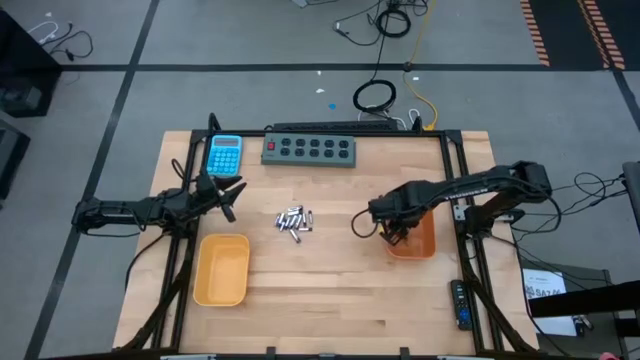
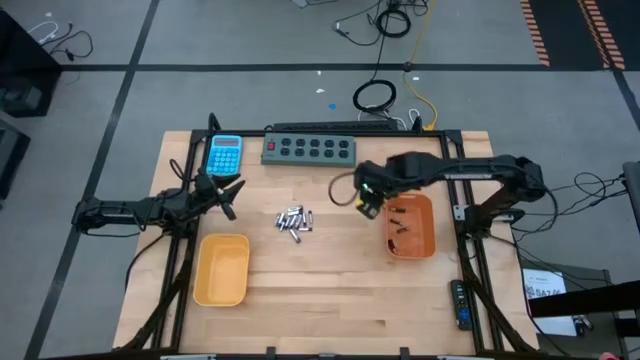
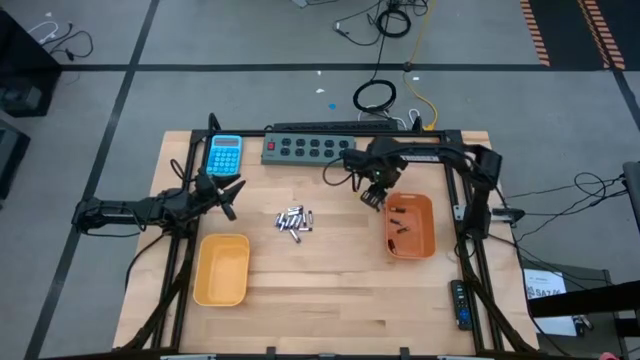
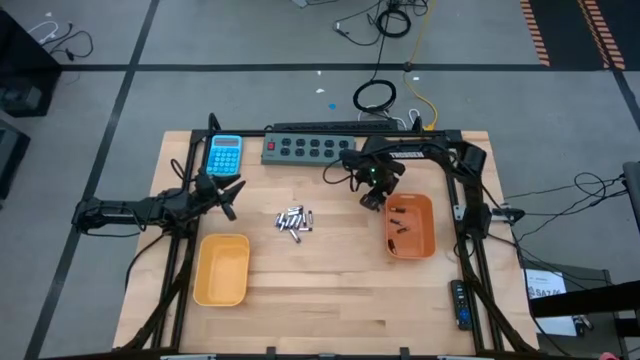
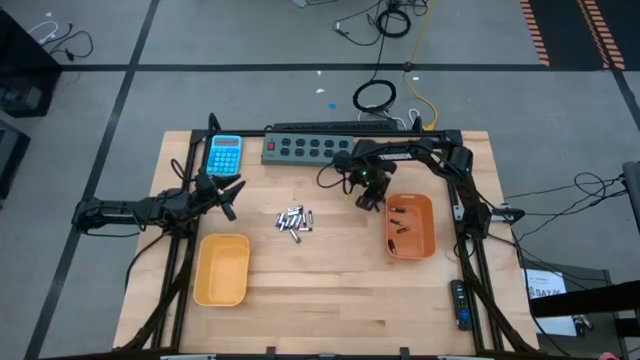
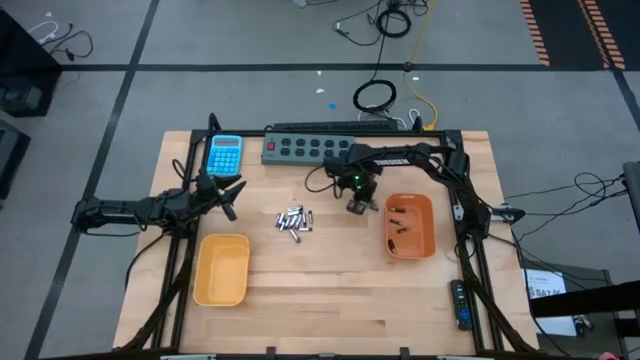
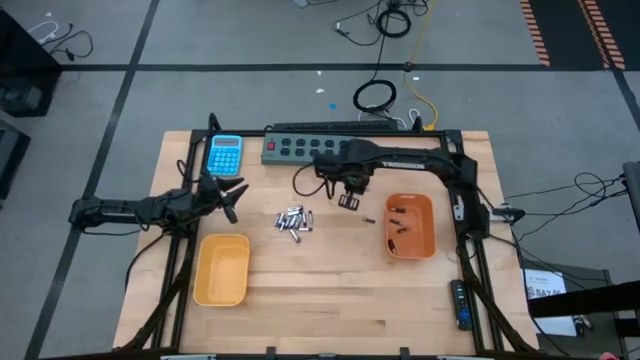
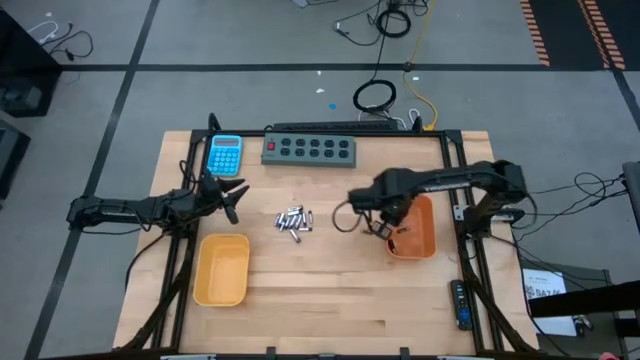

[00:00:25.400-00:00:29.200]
Task: Sort batteries
Put the black battery into the orange bin

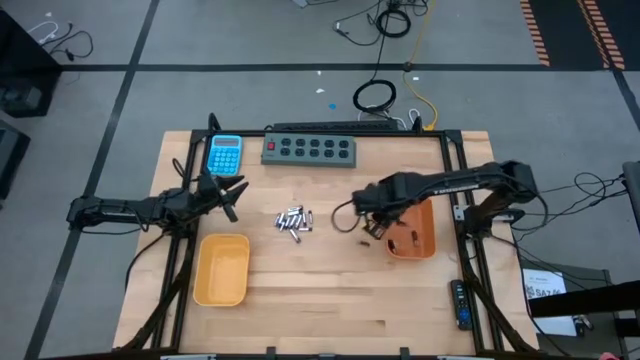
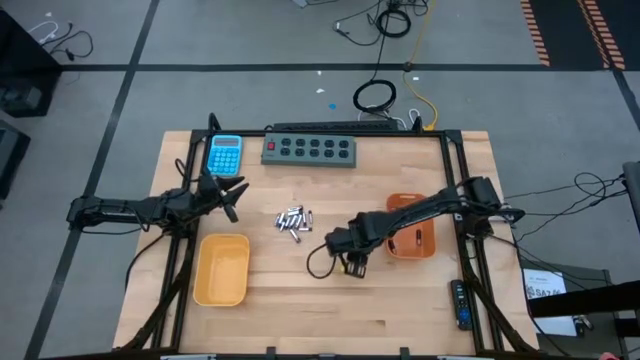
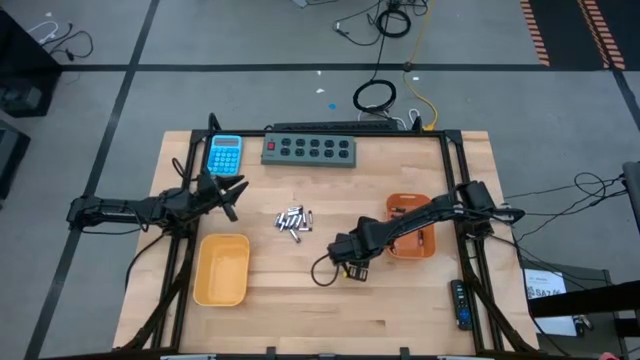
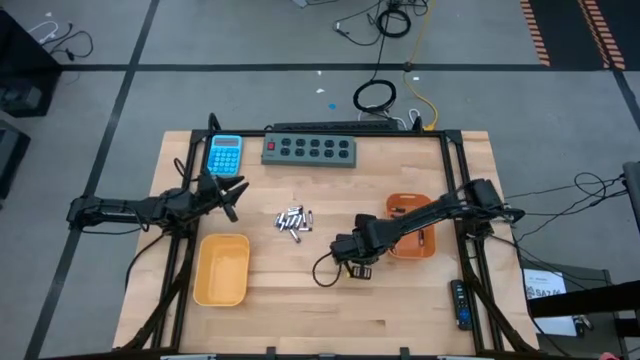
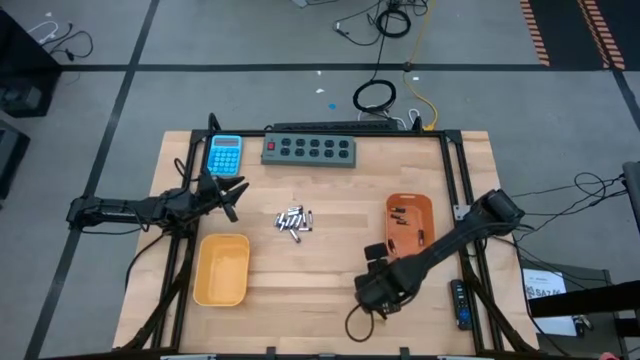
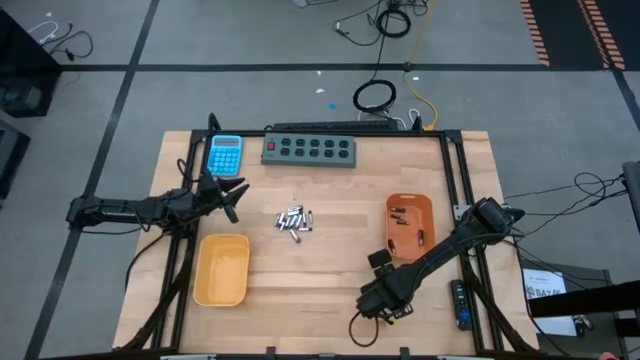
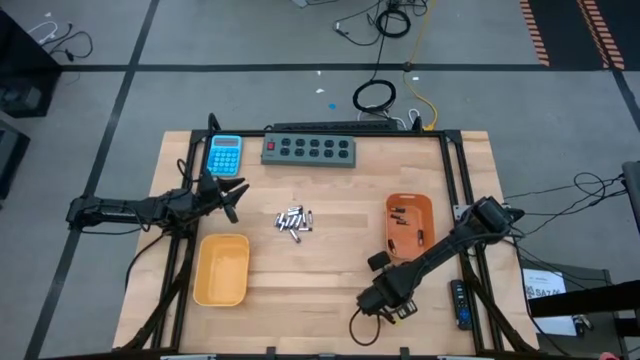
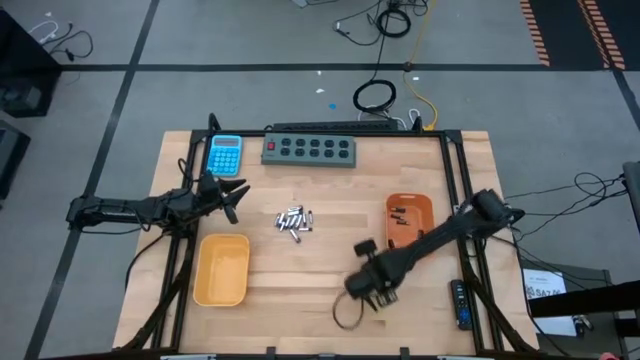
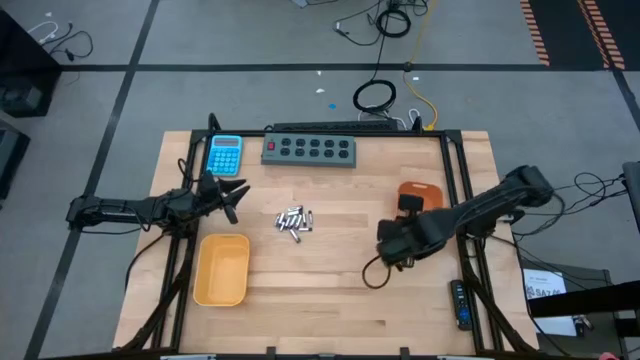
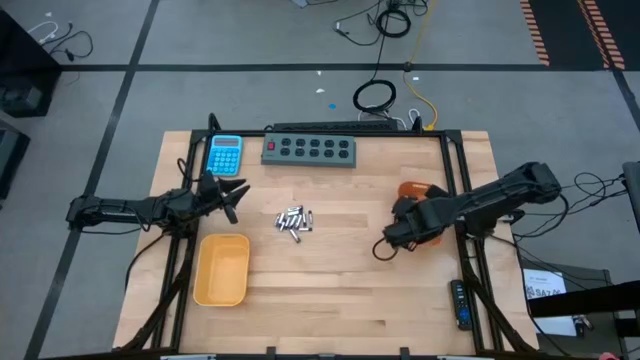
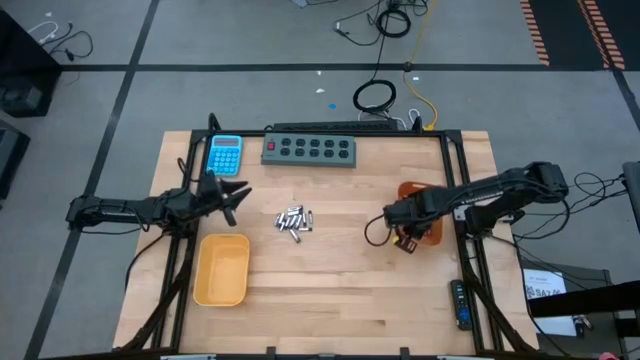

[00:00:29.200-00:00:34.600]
Put the black battery into the orange bin

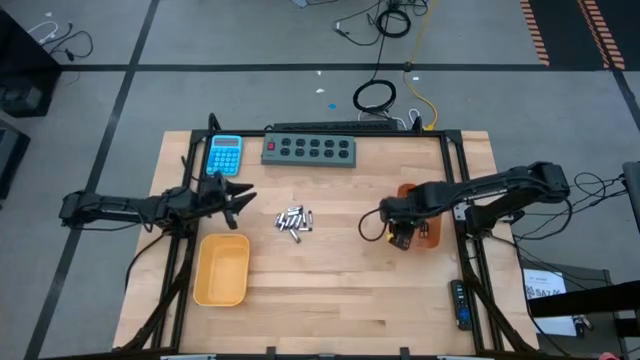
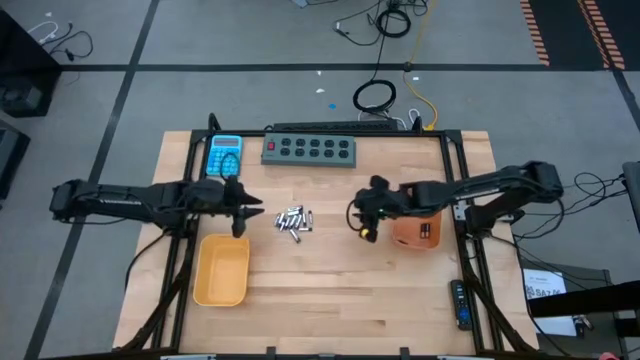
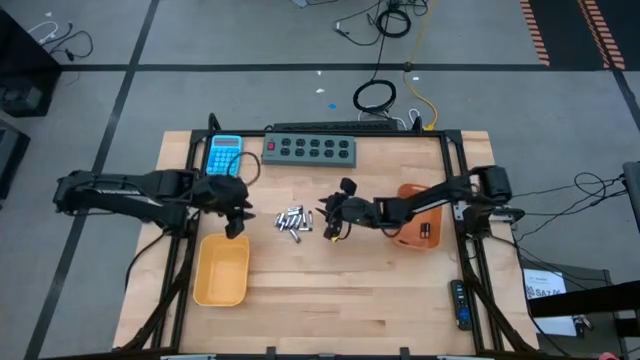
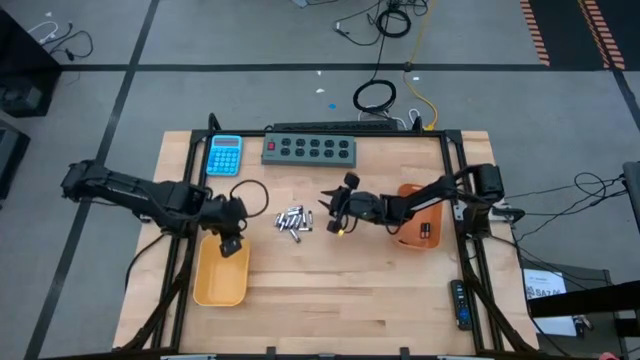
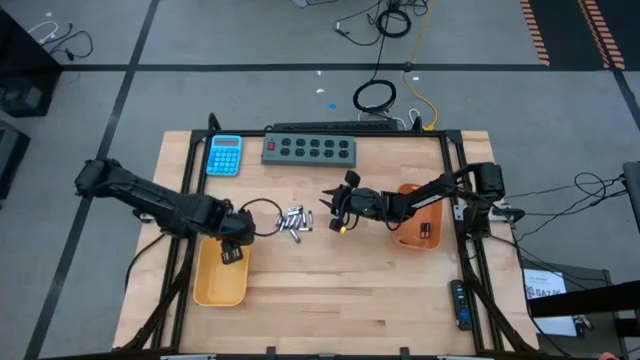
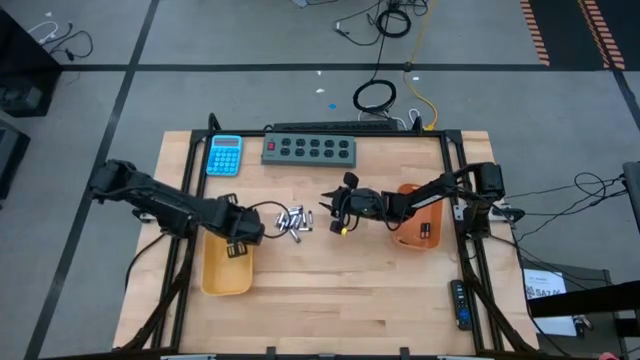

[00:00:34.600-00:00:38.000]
Adjust the yellow bin

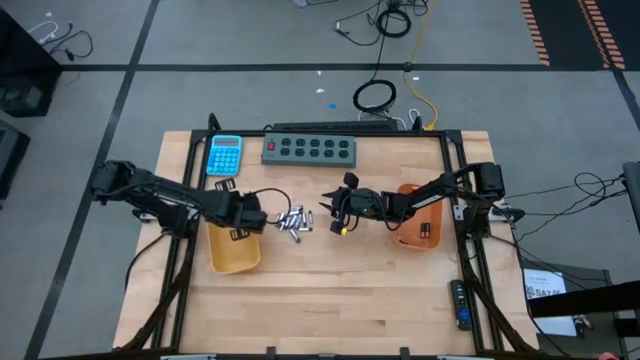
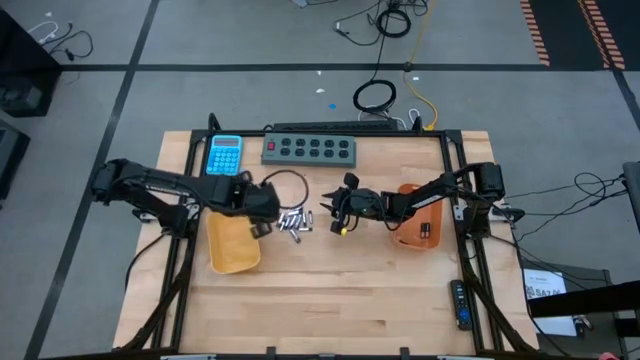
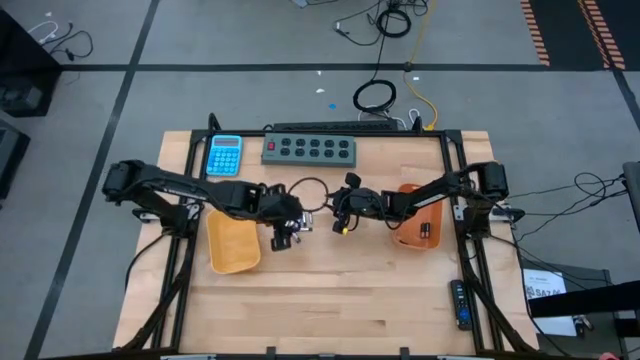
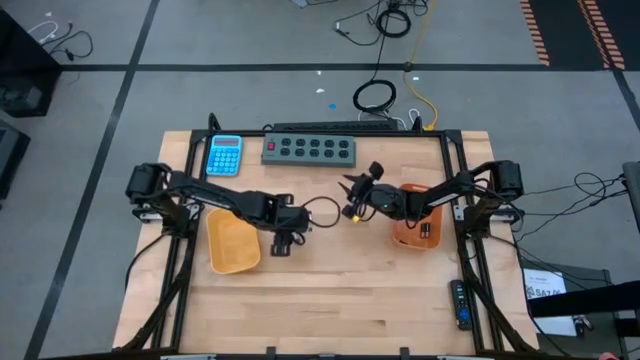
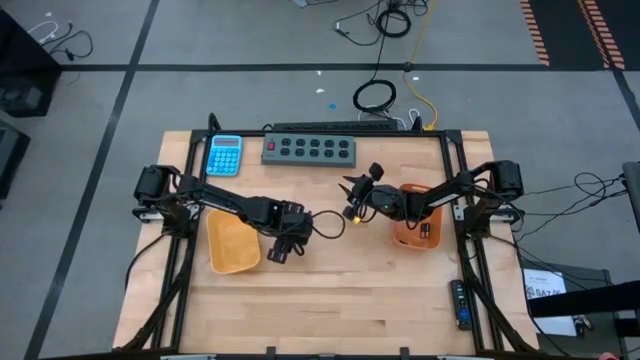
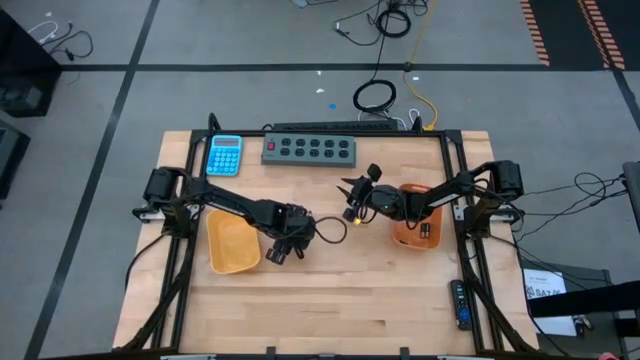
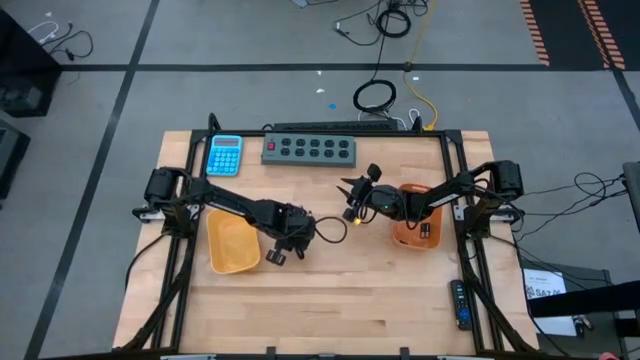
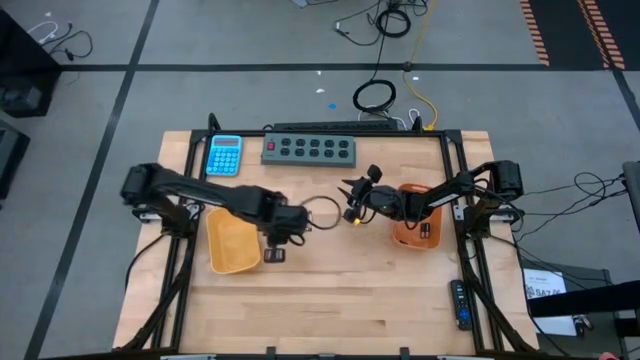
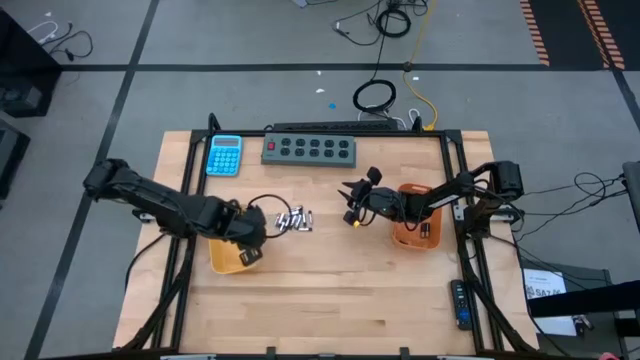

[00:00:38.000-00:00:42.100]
Put the white battery into the yellow bin

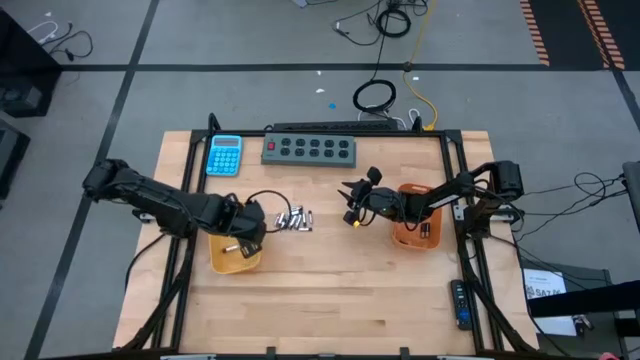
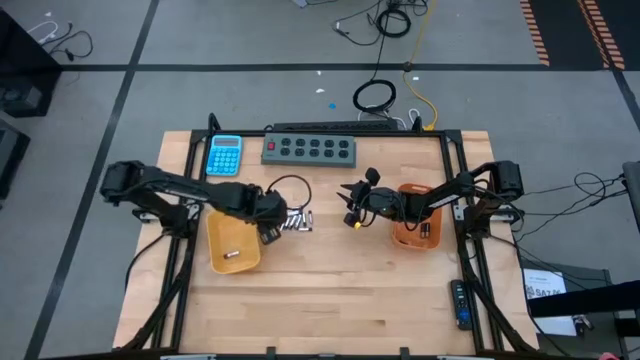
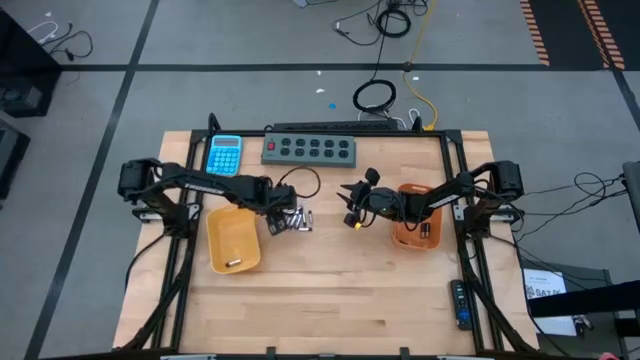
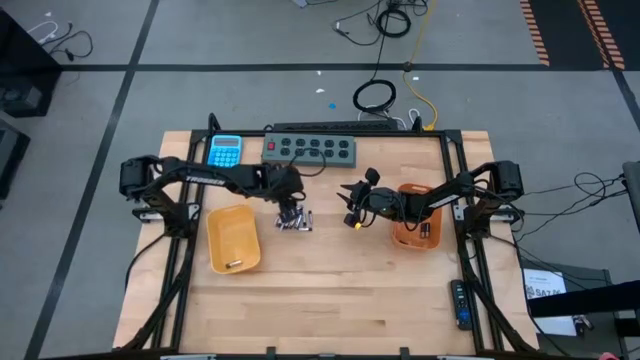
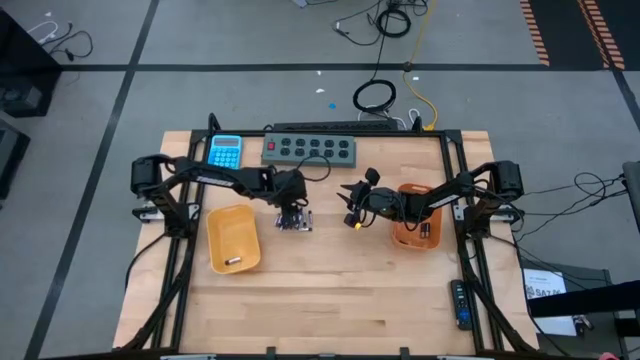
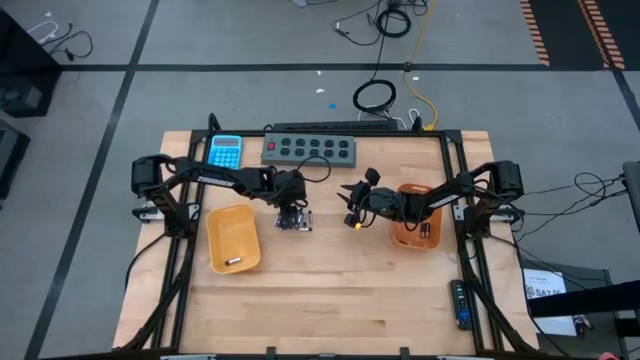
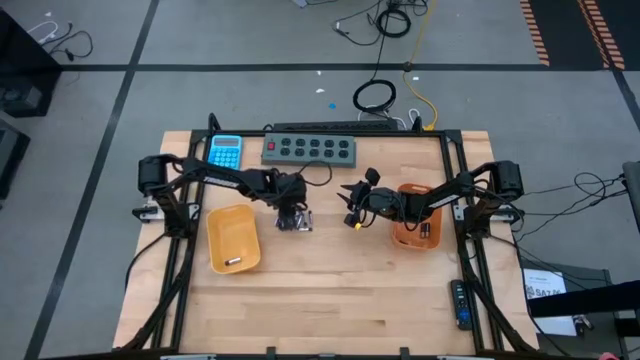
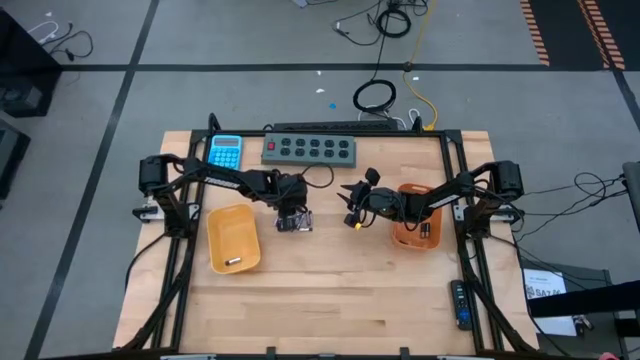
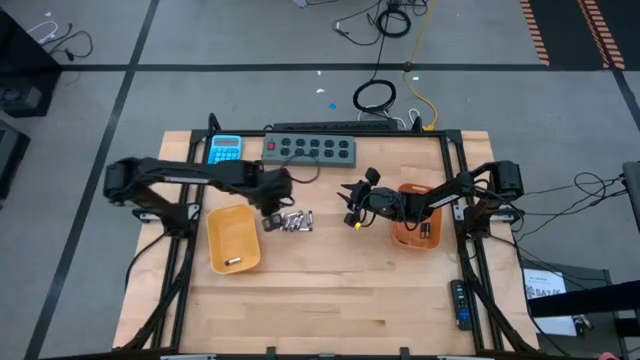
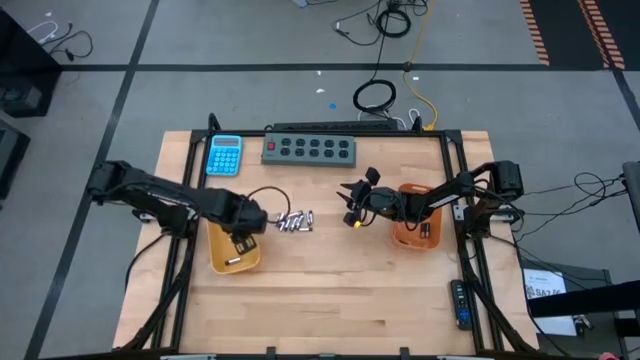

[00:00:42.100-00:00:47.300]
Put the white battery into the yellow bin
